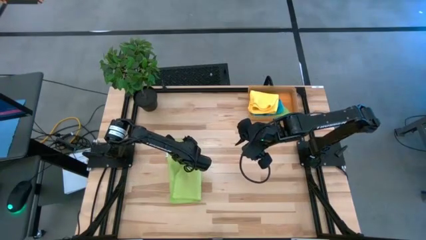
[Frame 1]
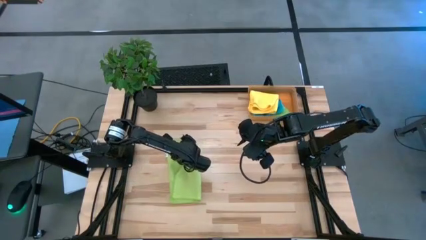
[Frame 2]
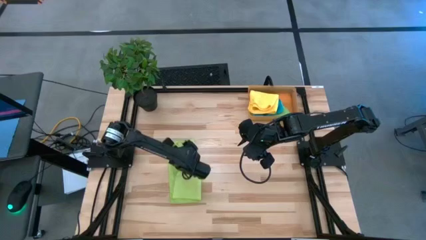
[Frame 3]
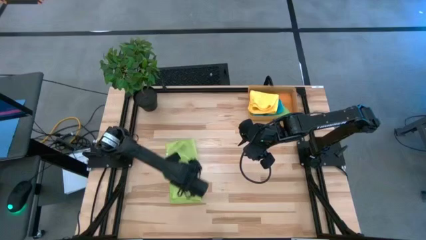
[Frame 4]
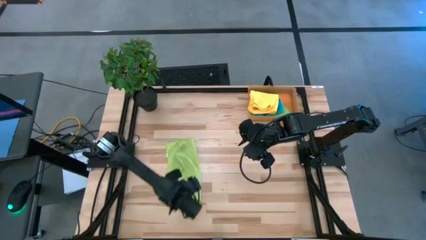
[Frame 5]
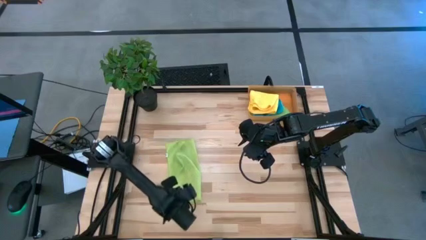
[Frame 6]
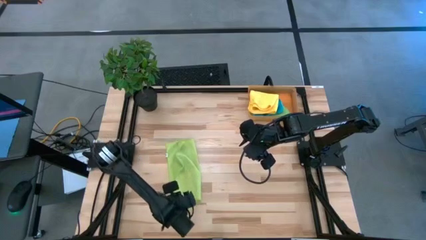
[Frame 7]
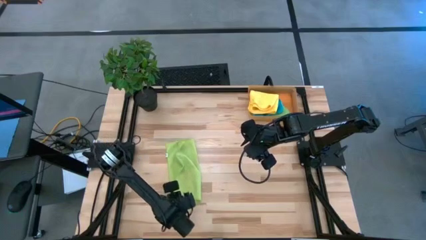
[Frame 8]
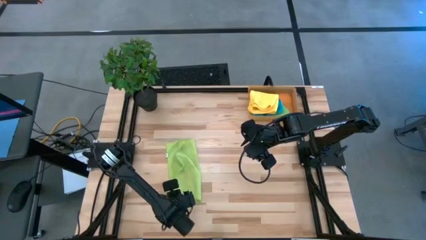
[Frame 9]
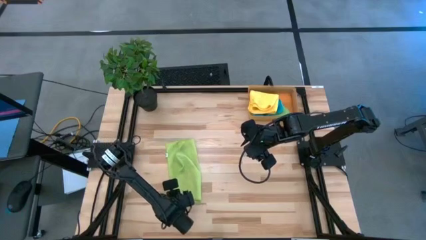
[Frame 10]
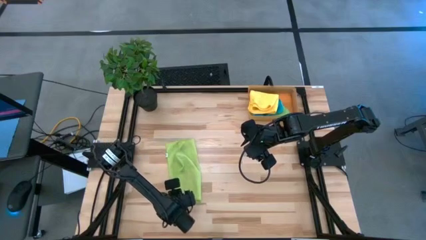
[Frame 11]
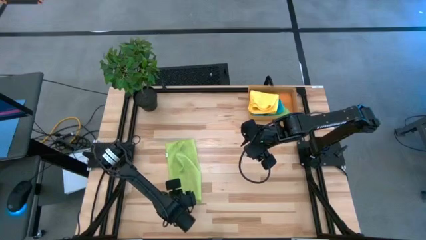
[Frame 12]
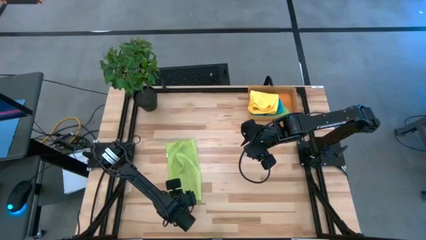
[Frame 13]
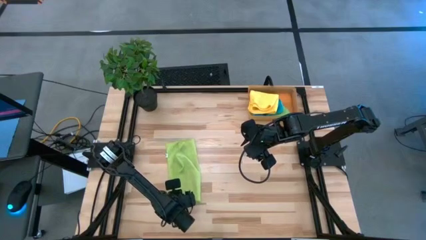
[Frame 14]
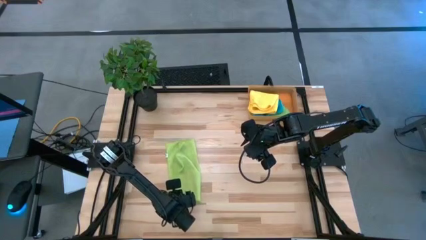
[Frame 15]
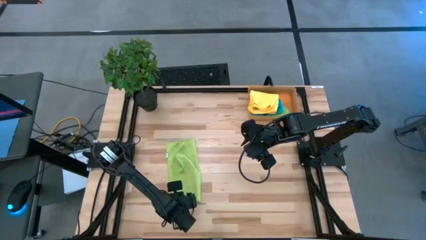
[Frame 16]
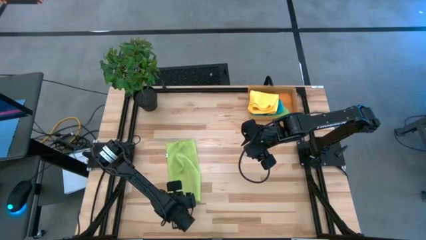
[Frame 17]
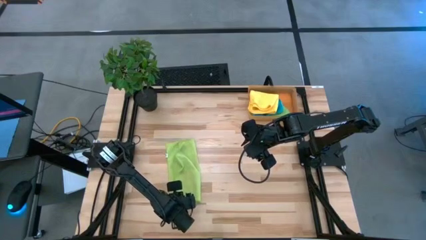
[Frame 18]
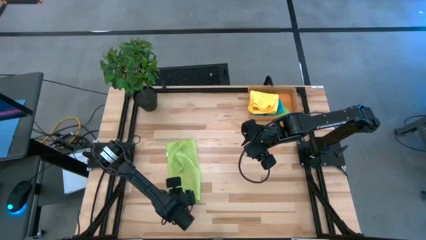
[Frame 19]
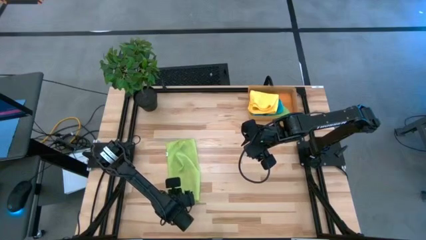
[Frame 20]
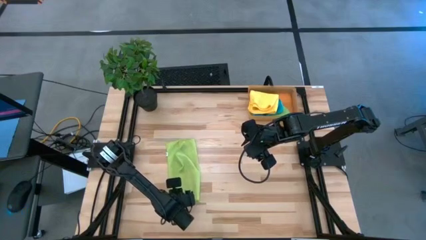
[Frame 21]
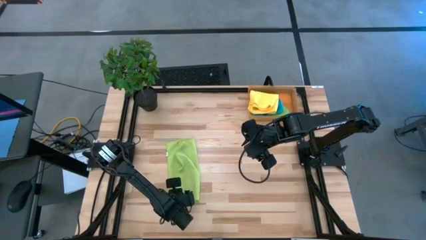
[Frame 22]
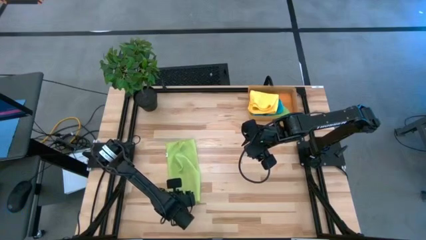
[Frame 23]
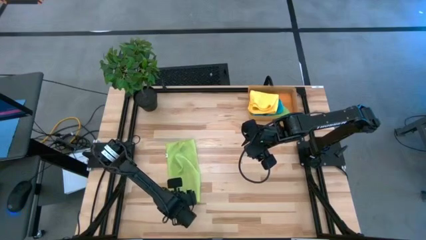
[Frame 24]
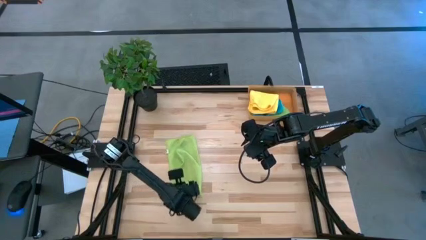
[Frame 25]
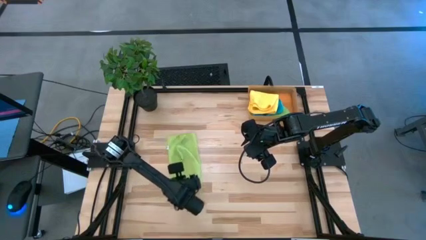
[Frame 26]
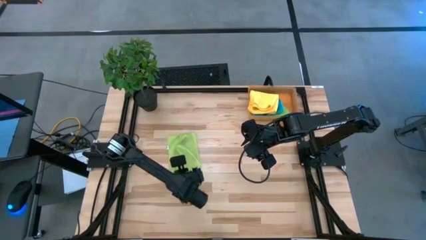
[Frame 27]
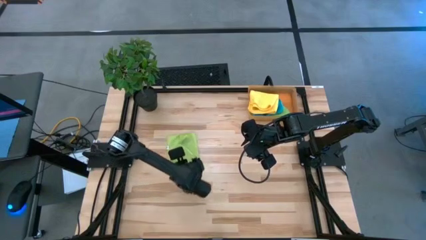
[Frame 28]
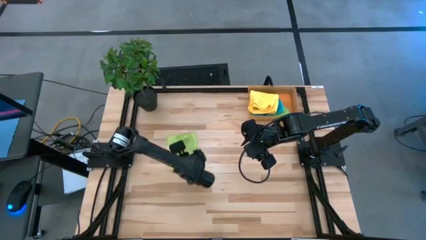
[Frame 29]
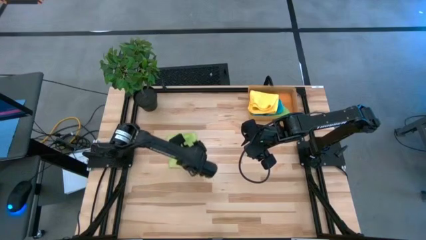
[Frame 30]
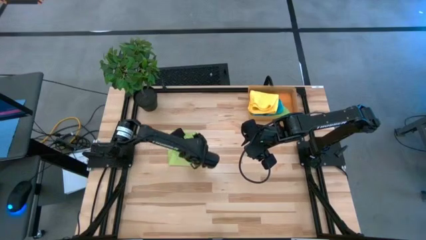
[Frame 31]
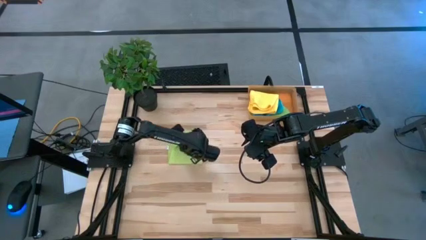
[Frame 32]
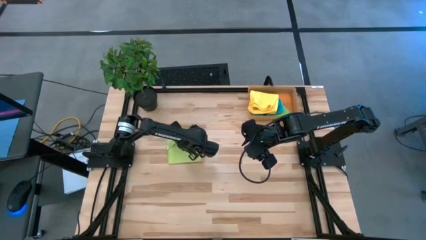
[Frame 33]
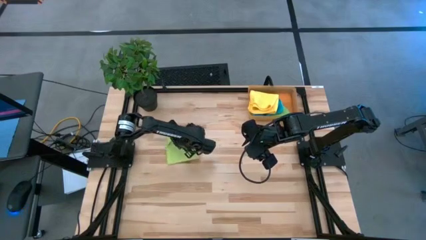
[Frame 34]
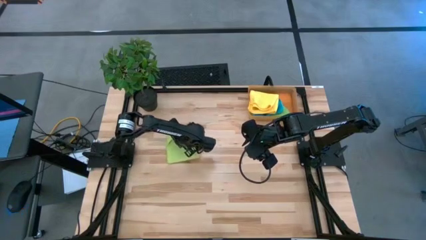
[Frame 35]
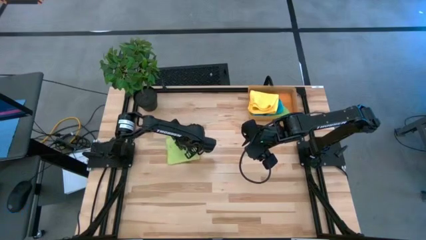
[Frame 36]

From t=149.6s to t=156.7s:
Task: Fold microfiber towels
Fold the light green microfiber towel

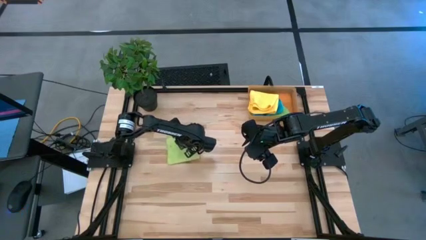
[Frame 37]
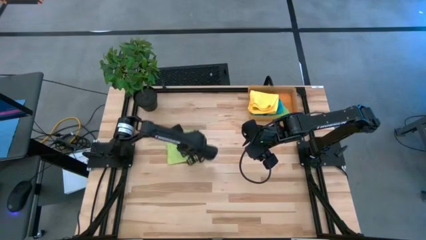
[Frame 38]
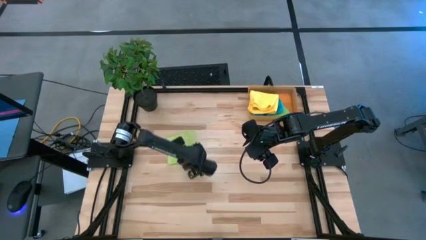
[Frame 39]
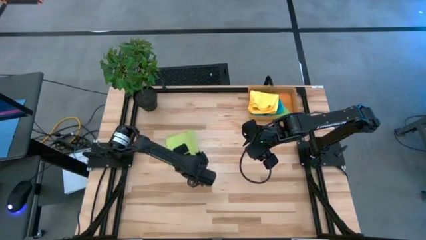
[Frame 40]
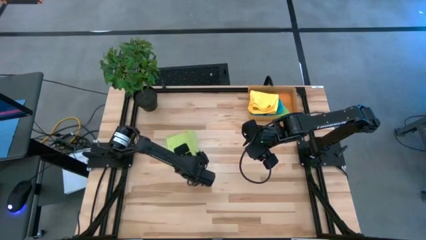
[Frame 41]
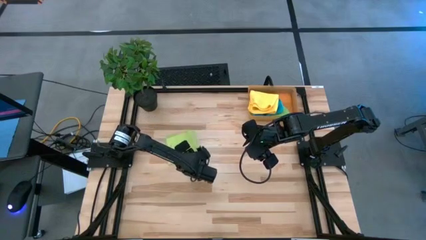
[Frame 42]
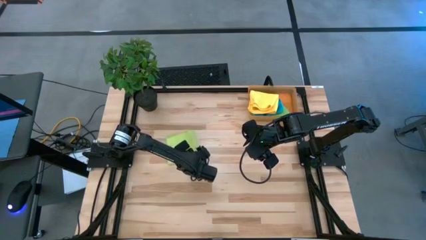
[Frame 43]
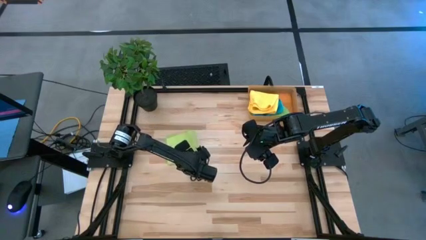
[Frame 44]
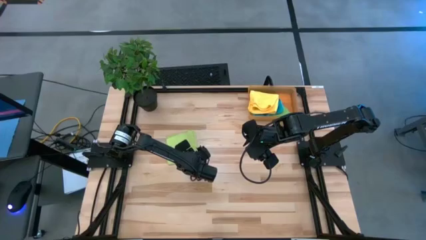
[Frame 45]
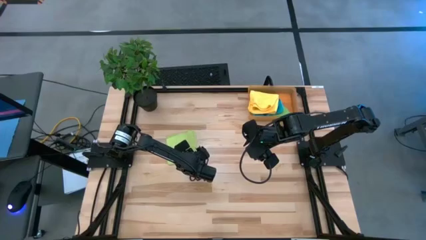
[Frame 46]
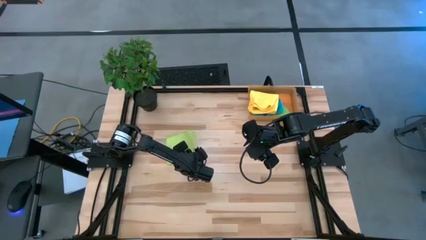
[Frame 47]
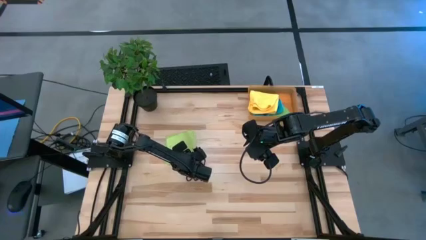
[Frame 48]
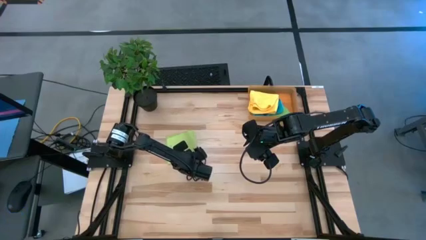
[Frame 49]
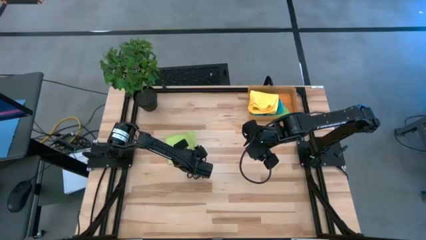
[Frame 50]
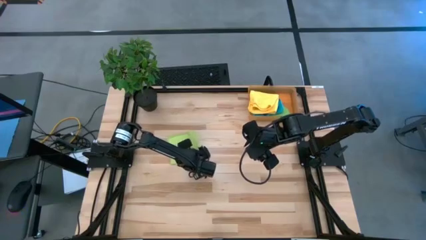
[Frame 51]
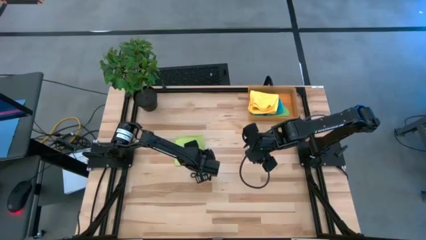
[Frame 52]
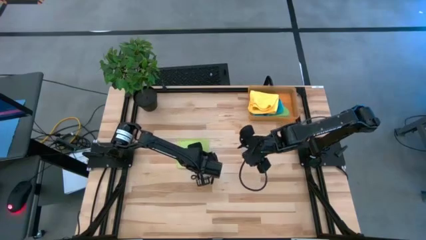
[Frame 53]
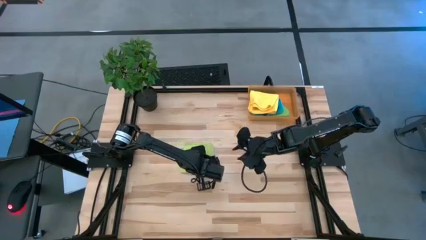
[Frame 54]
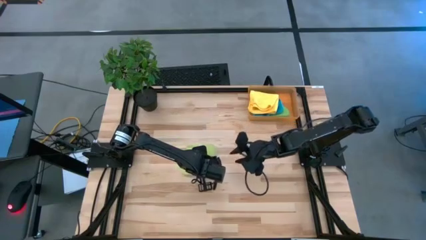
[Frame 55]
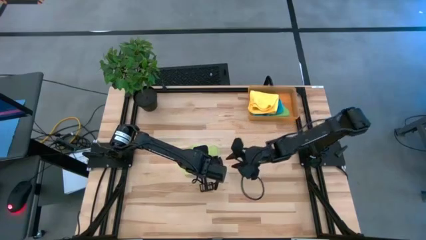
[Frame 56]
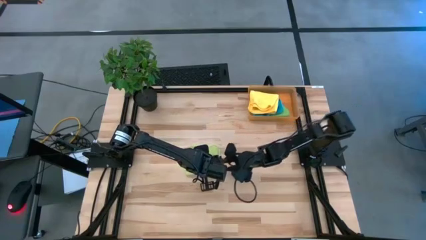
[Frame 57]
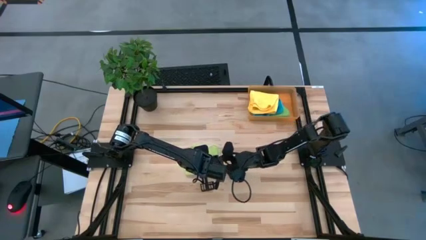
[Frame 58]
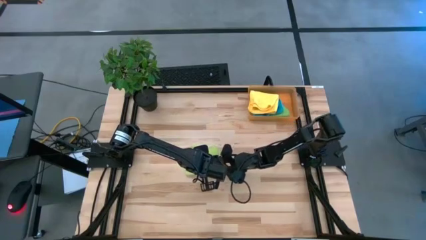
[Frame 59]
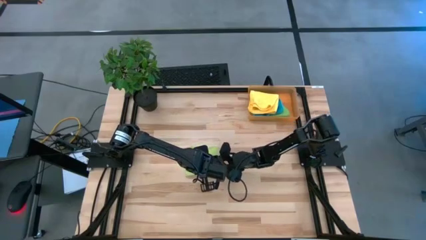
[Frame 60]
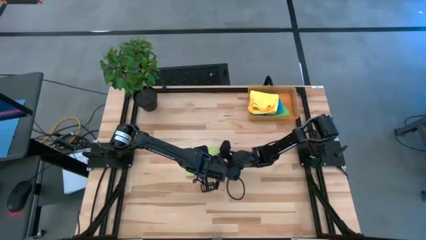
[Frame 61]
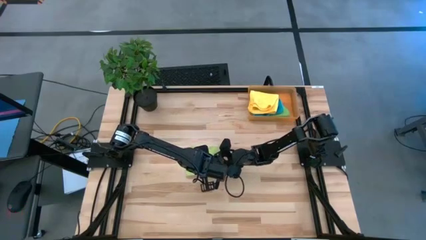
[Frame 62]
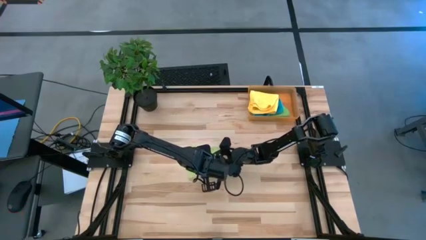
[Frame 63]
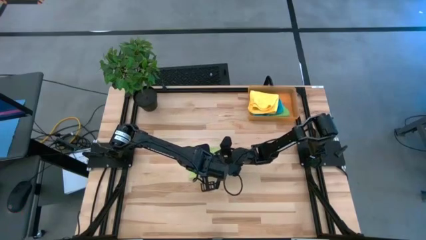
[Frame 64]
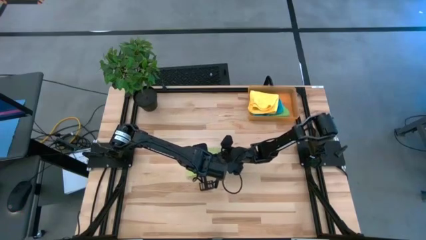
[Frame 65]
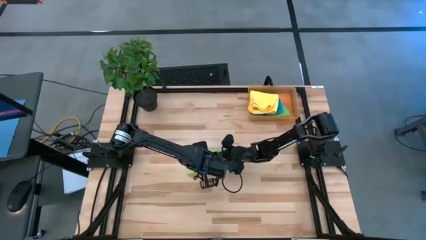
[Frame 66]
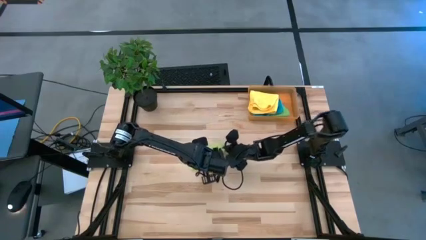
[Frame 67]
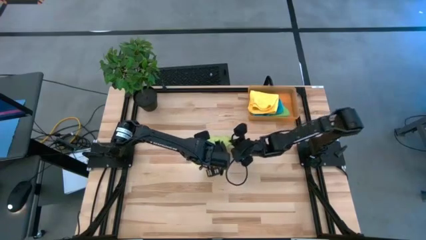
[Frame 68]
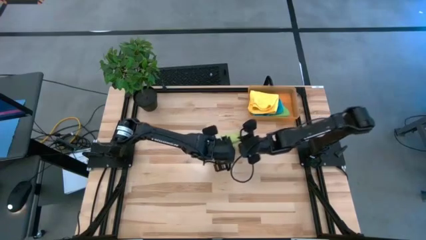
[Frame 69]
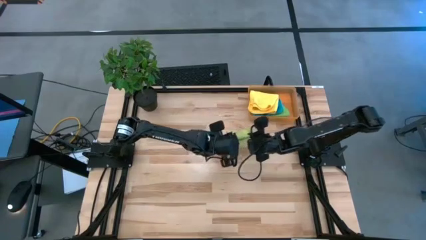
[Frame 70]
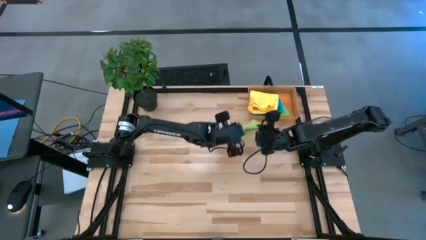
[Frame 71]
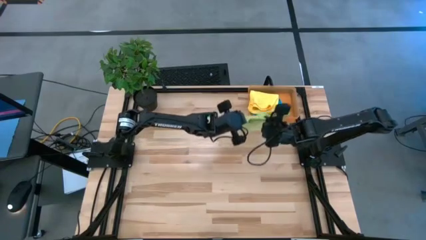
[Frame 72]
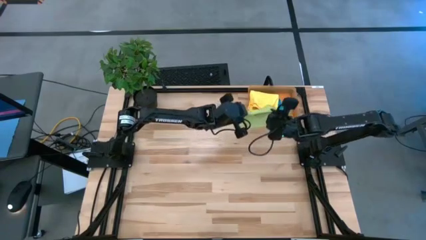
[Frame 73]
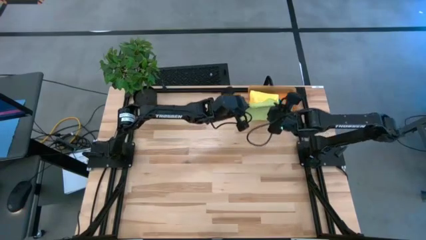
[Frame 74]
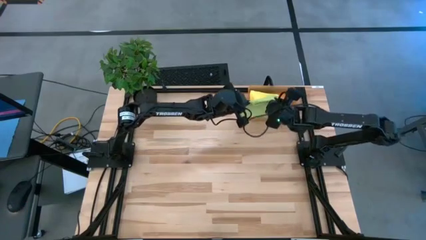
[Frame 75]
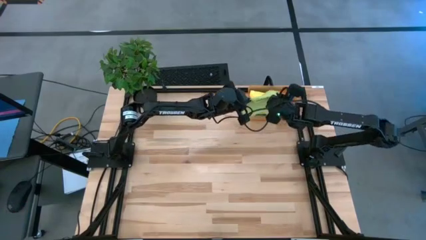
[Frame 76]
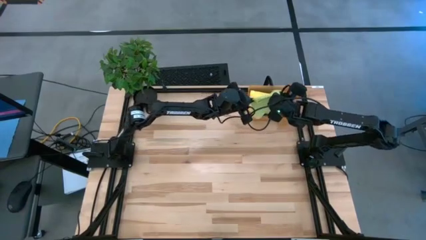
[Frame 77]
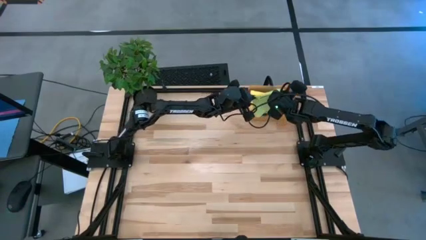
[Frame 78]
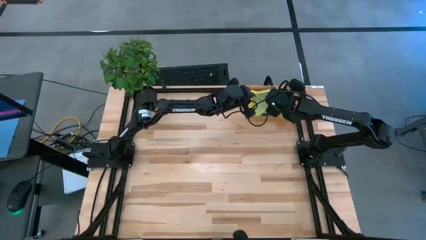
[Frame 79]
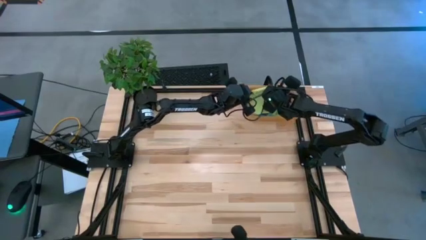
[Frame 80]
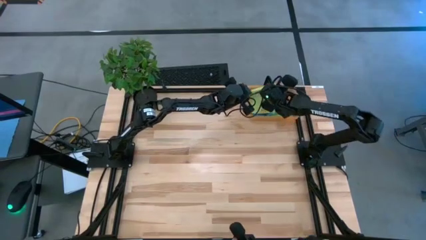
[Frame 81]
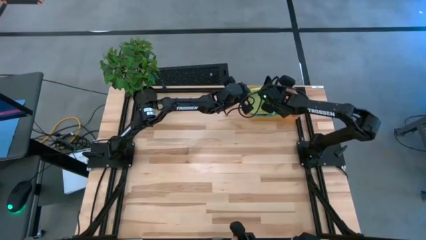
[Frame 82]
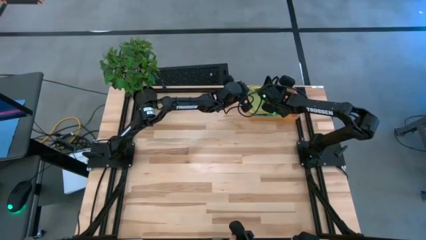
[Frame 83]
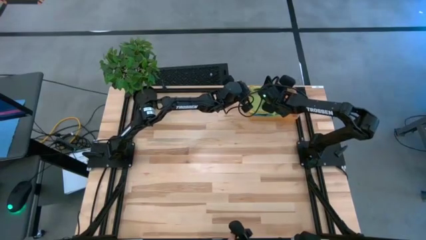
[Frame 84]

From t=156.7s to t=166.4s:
Put the light green microfiber towel into the orange bin
